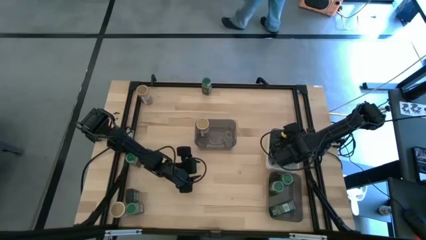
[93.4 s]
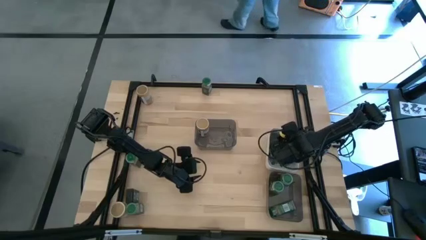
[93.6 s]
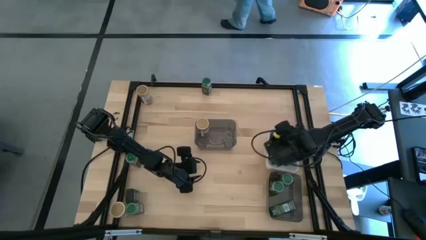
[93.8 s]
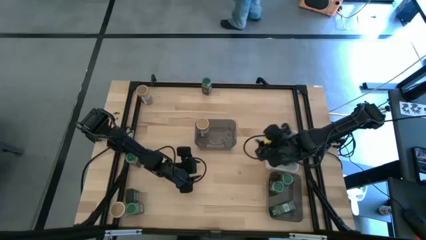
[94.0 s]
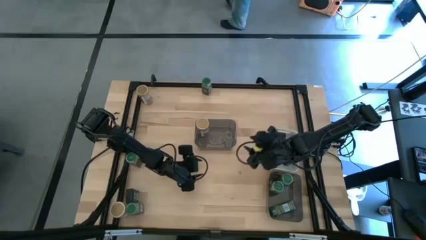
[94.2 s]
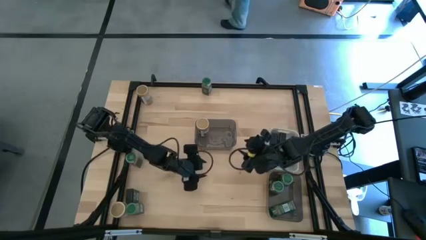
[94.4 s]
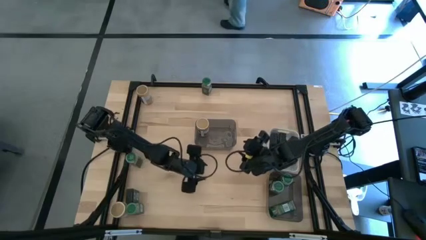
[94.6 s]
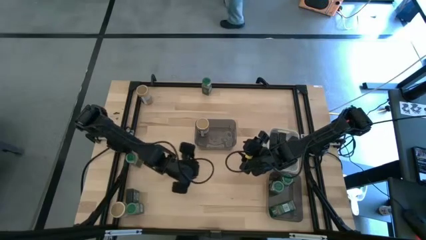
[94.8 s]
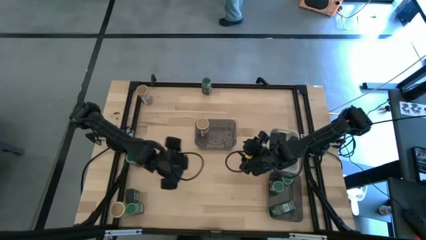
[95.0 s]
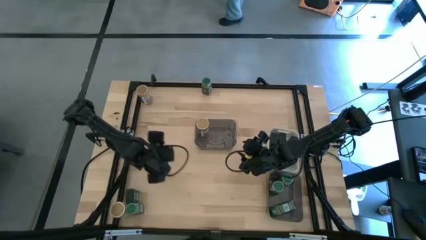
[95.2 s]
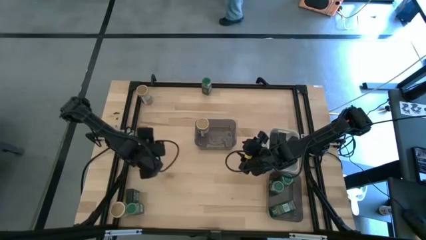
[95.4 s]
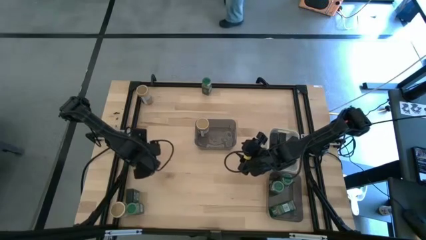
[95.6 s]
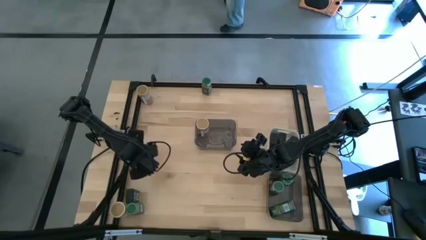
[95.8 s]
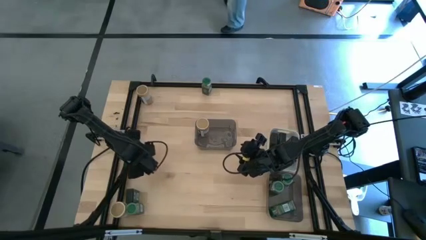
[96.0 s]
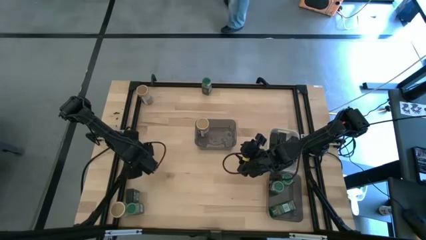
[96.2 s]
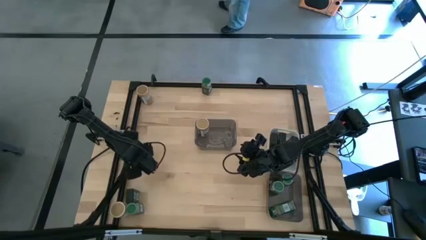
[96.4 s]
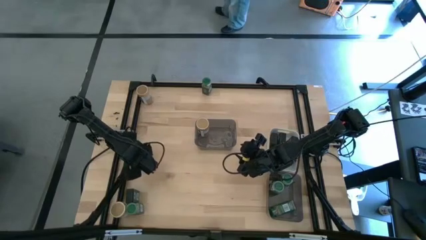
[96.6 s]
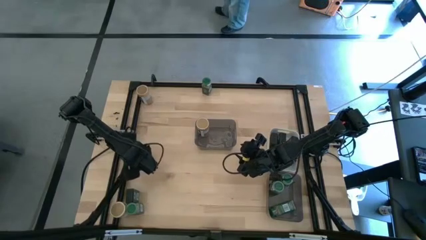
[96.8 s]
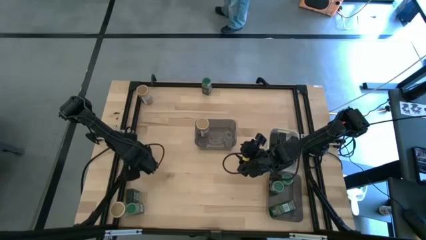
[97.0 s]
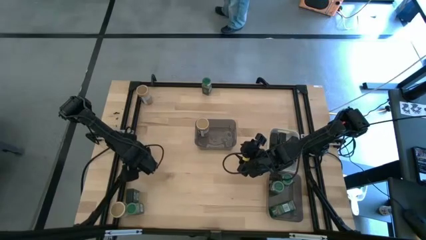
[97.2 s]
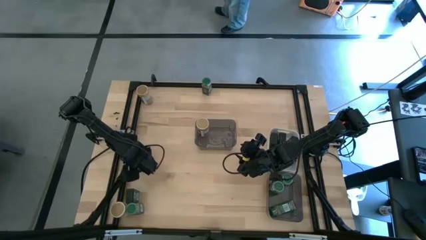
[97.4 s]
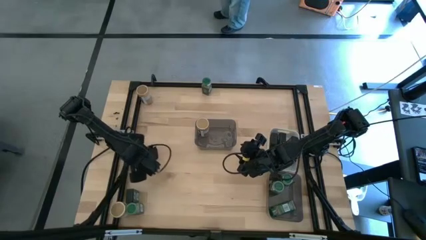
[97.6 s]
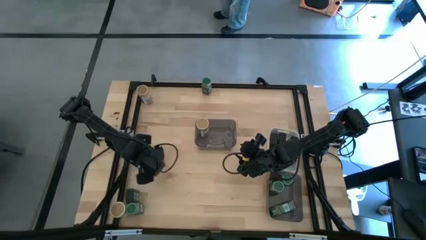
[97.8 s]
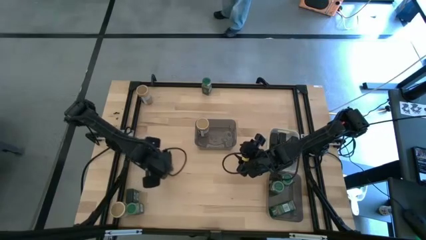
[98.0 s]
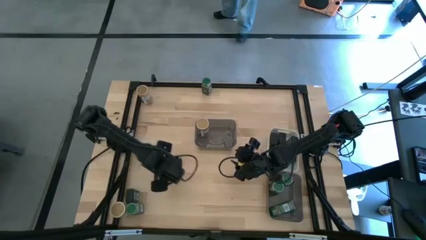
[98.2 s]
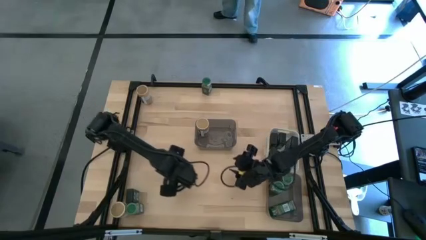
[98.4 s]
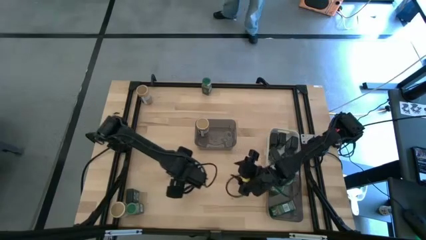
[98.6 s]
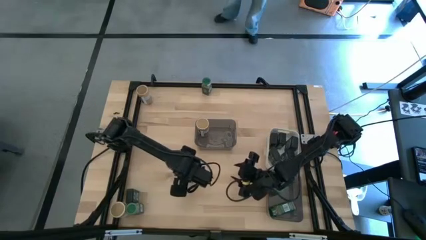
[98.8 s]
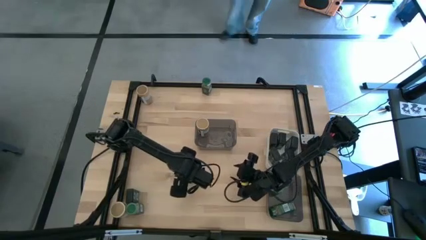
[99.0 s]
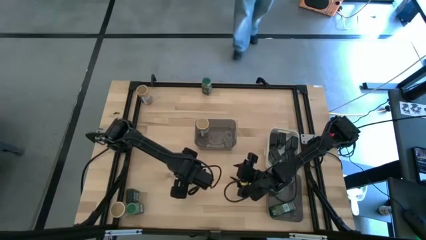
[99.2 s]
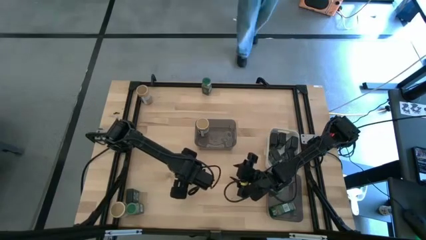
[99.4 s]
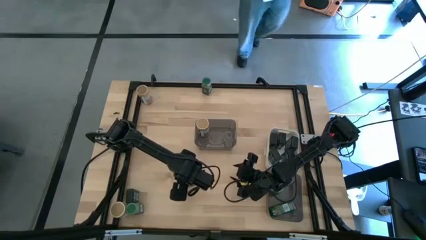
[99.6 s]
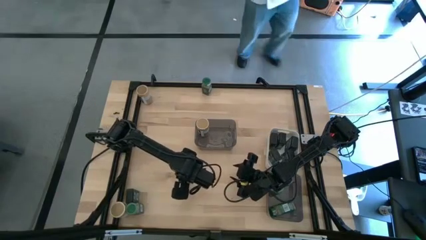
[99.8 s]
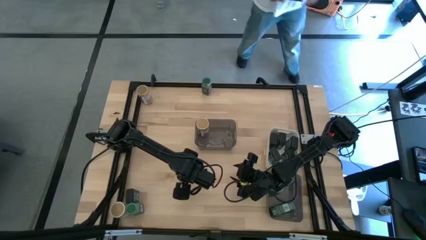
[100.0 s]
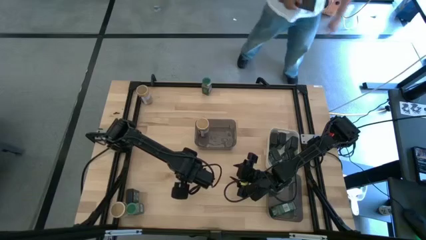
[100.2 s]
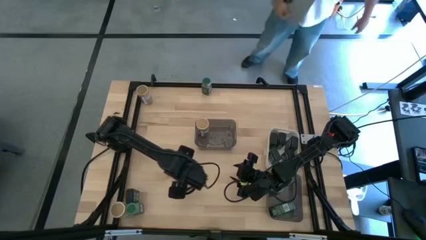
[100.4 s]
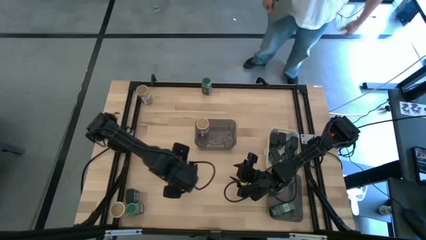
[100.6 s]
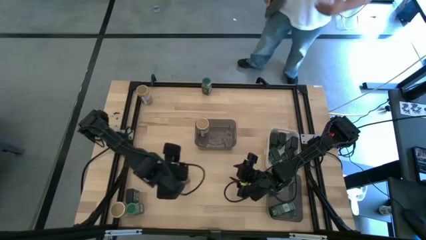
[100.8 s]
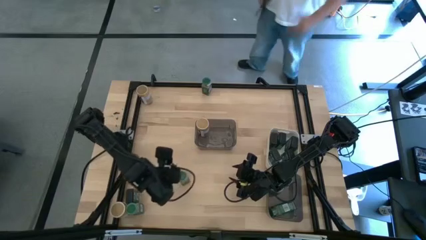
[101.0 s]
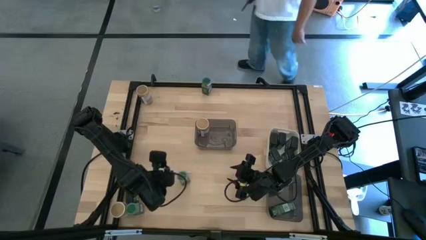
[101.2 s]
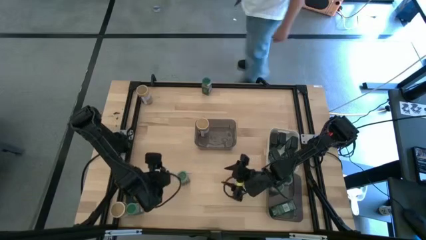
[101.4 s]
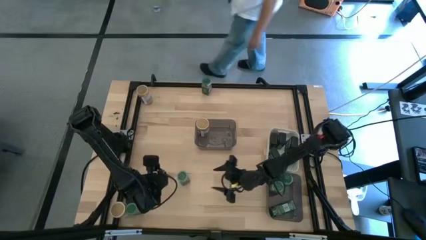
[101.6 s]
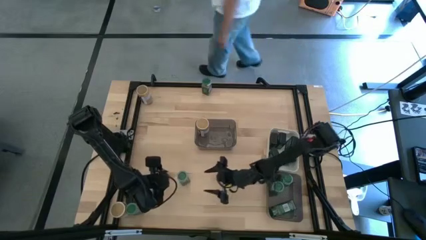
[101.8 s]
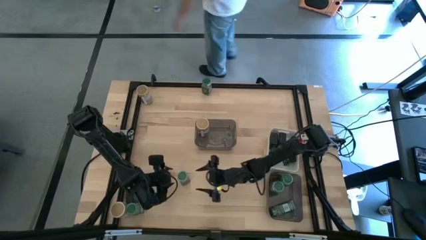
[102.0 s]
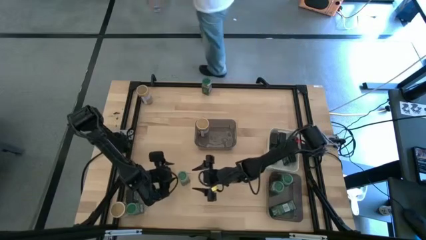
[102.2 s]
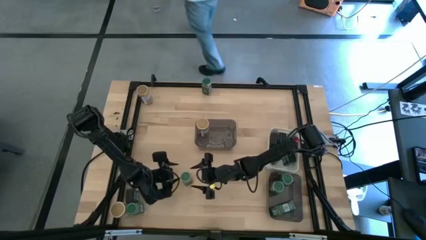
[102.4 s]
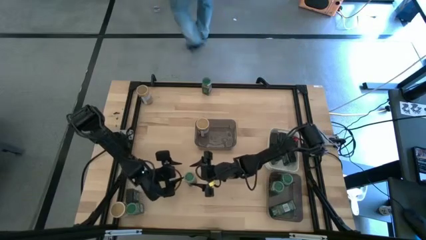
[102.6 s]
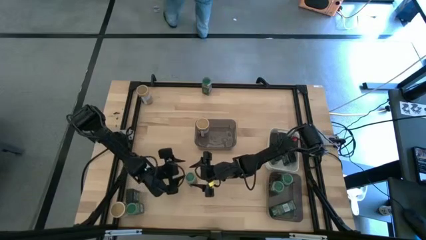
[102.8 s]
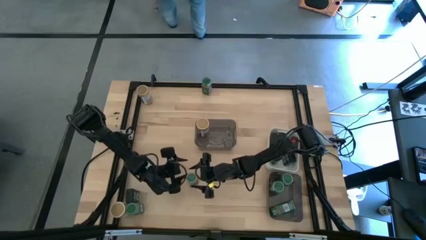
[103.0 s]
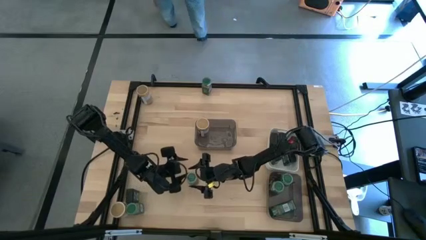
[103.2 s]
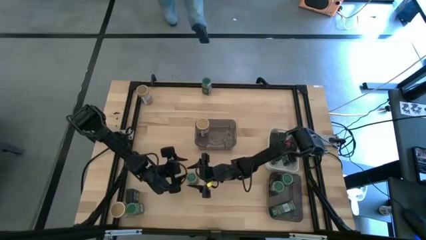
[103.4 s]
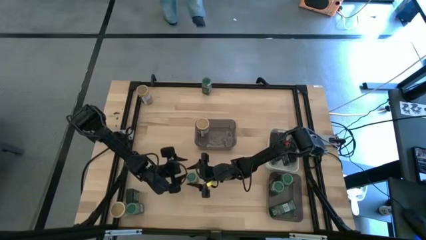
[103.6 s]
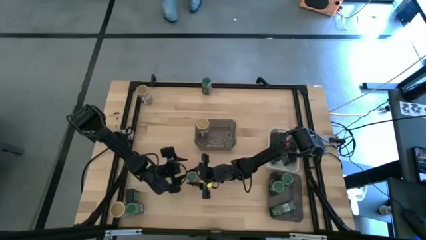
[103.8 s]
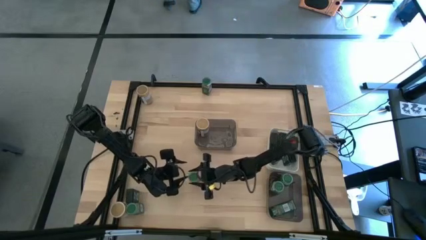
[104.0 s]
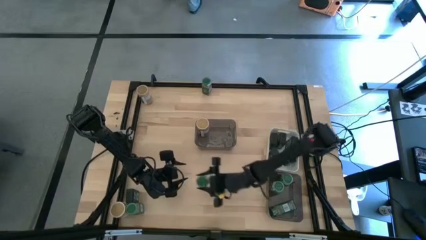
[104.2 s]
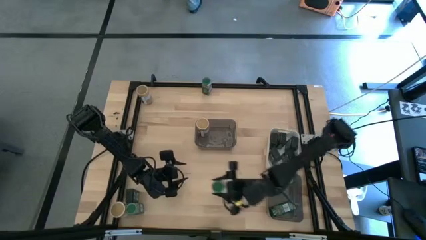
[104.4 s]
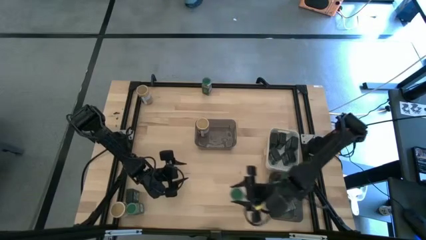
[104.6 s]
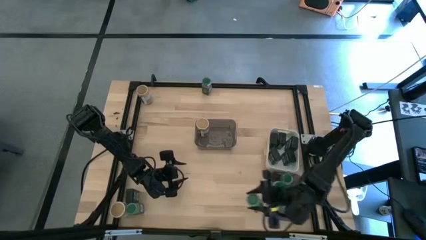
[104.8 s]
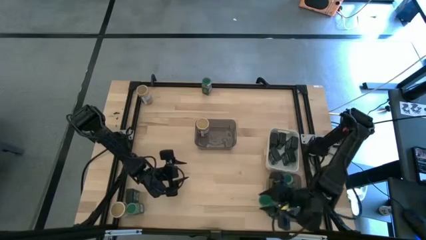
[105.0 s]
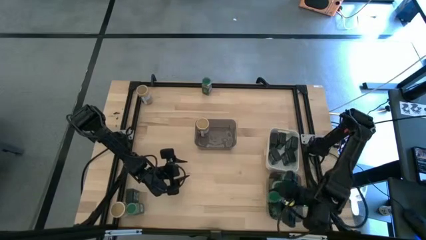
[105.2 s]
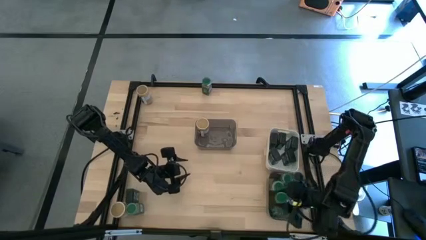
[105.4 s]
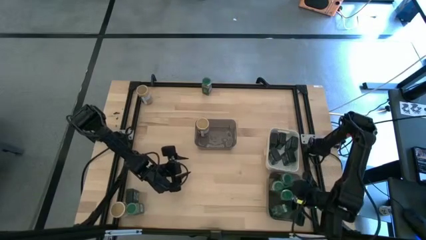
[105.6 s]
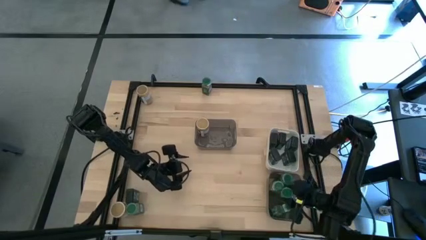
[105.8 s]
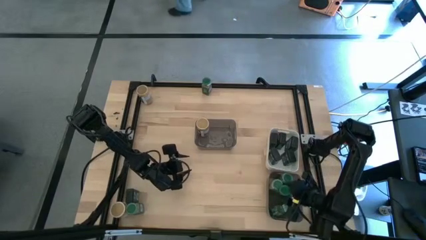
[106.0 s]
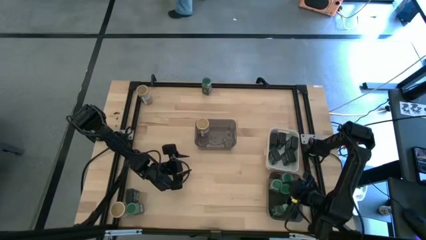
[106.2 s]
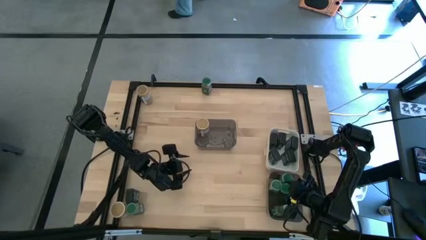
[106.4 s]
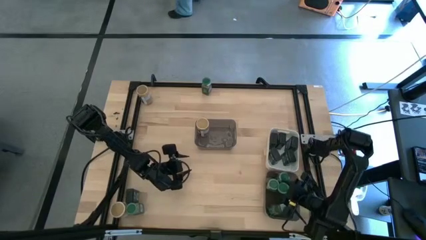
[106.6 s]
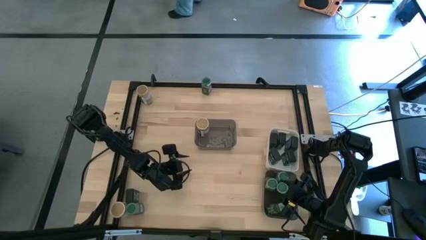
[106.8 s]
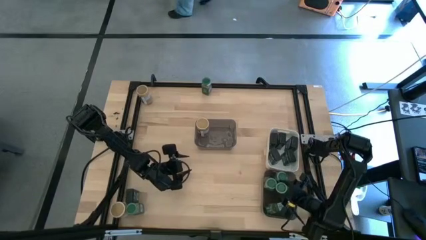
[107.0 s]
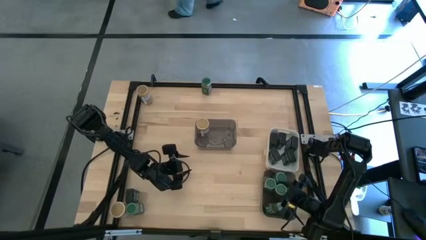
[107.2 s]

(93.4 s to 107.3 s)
Task: Sort spices by type
Put the center green seasoning bottle into the bottom black bin

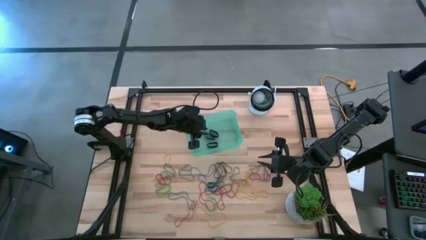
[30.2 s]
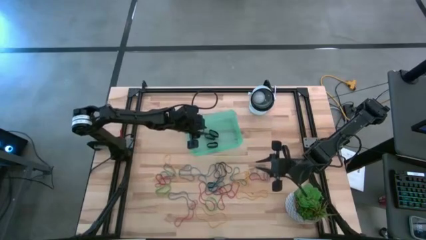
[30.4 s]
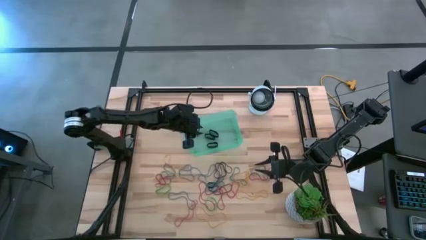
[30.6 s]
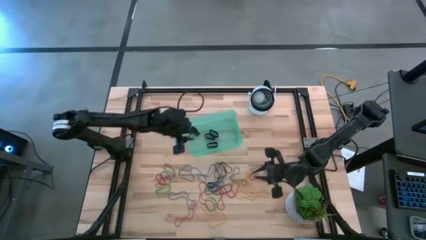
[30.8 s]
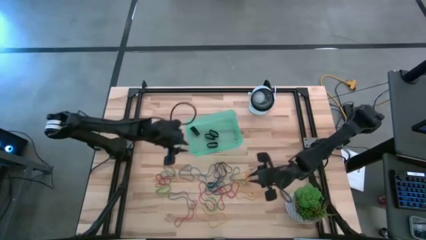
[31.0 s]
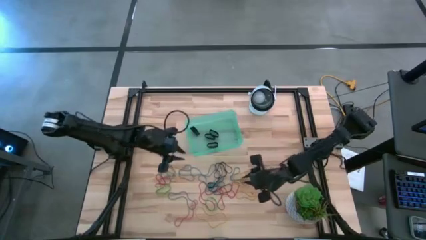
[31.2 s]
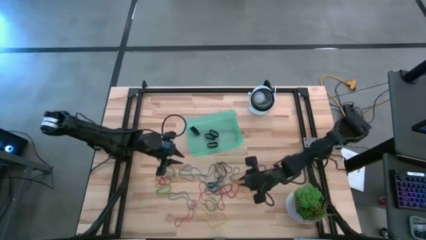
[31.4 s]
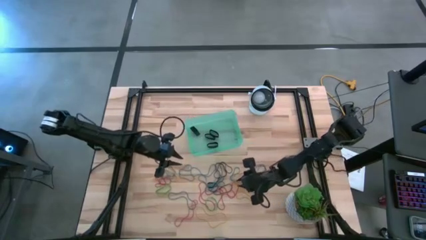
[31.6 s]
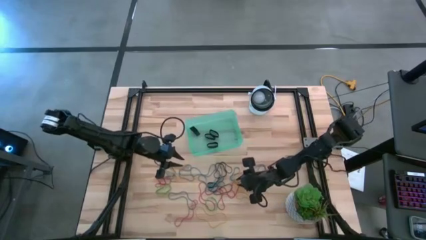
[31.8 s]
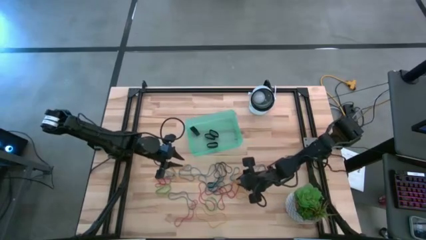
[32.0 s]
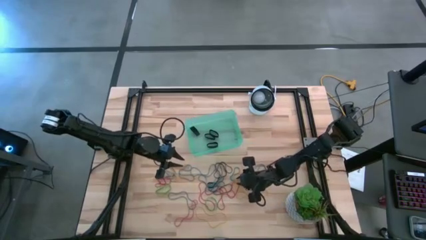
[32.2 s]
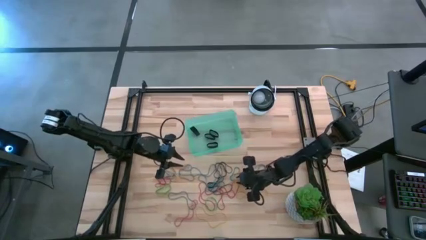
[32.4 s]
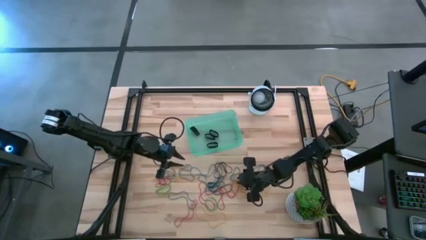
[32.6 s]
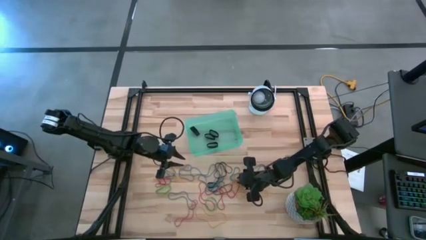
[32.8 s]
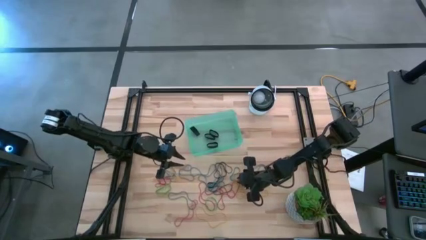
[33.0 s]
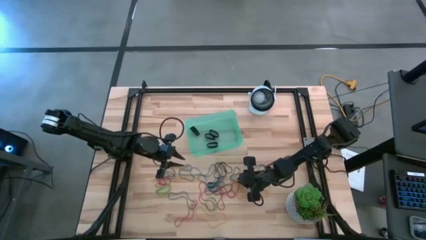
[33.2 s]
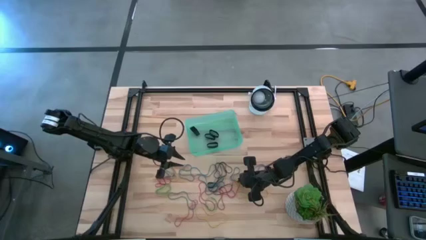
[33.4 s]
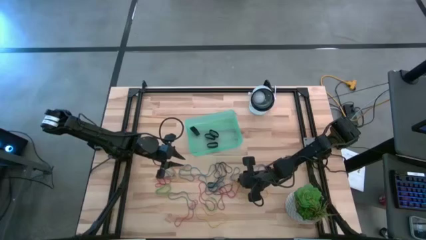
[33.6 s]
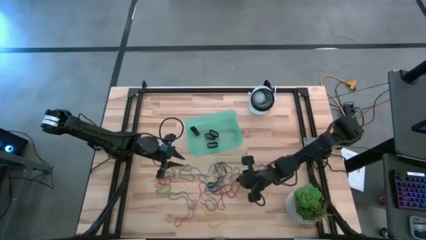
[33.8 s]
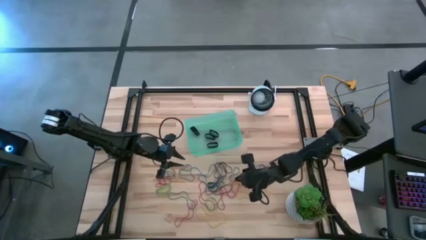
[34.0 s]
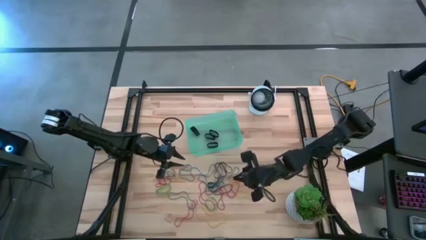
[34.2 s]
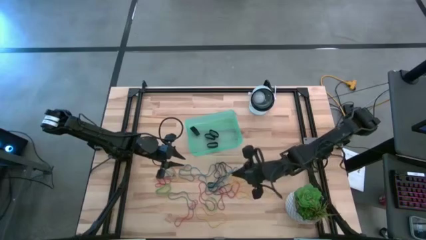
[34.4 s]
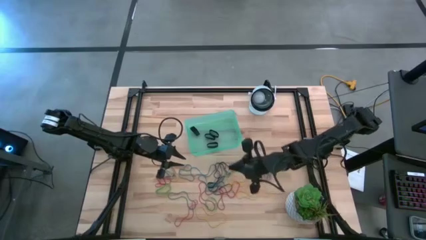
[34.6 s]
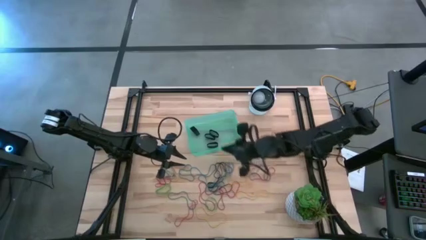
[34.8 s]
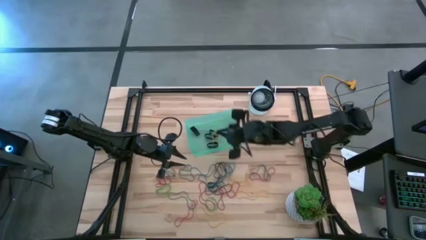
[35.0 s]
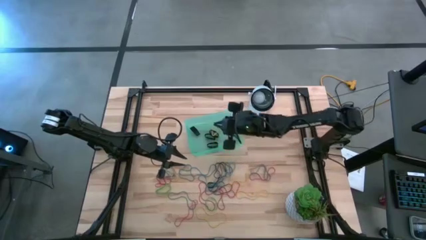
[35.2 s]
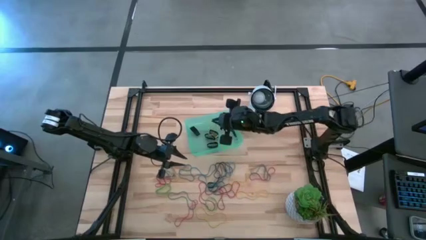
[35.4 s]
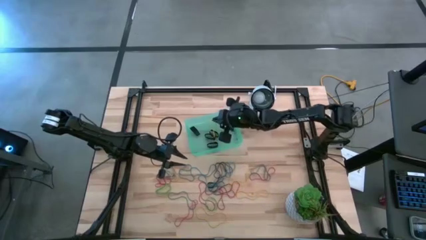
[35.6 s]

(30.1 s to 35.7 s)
Task: Pick and place rubber bands into bin
Put the yellow rubber band into the green bin
